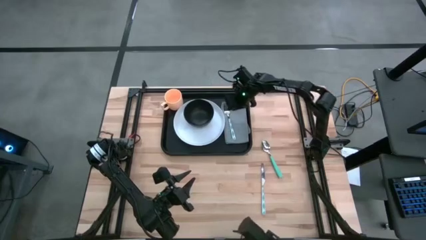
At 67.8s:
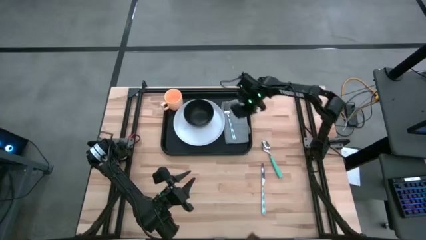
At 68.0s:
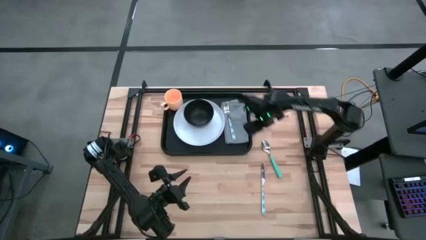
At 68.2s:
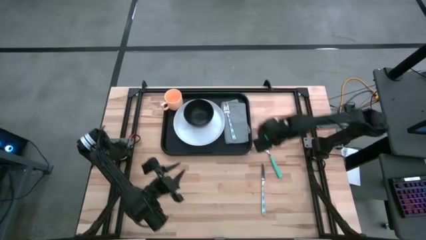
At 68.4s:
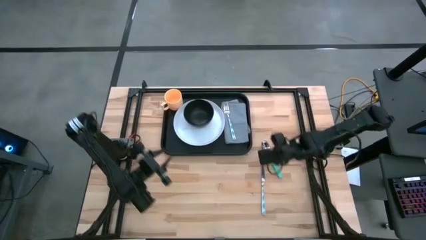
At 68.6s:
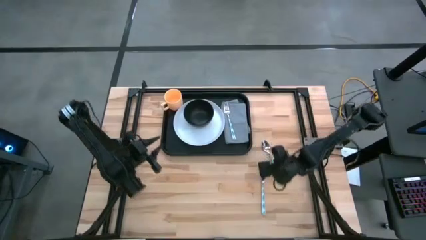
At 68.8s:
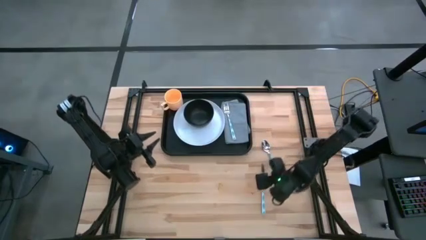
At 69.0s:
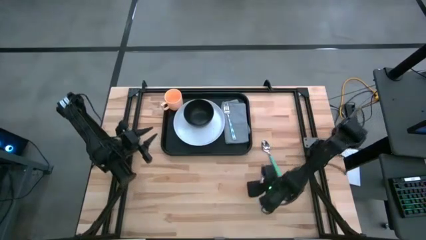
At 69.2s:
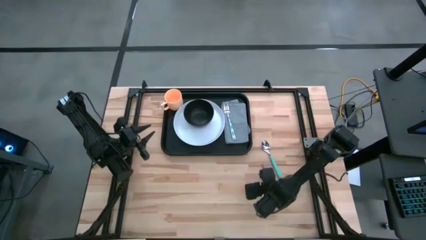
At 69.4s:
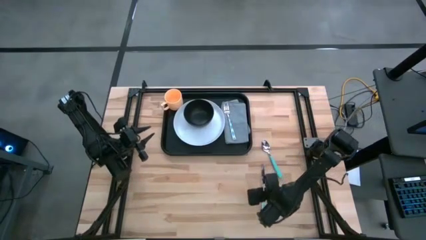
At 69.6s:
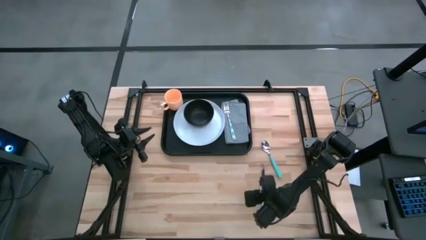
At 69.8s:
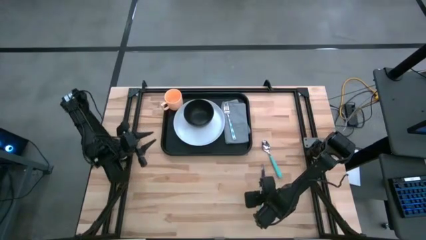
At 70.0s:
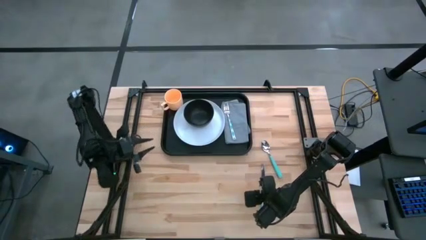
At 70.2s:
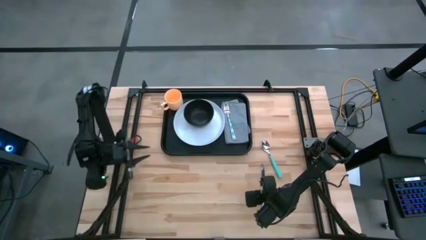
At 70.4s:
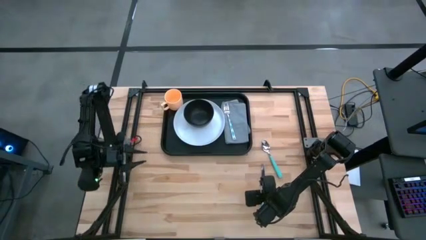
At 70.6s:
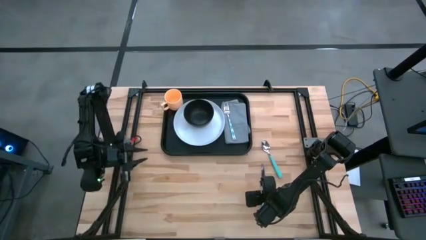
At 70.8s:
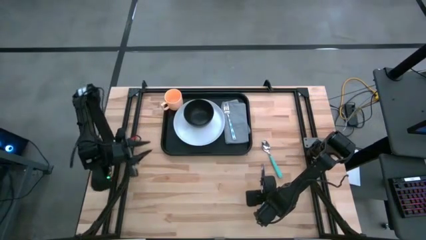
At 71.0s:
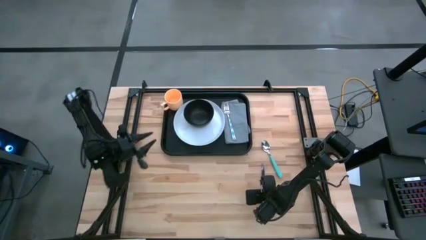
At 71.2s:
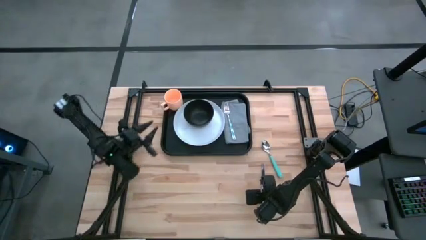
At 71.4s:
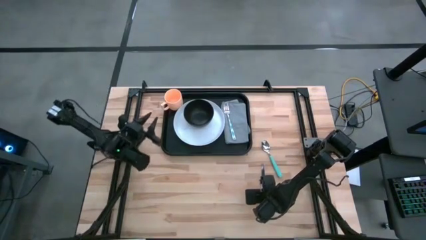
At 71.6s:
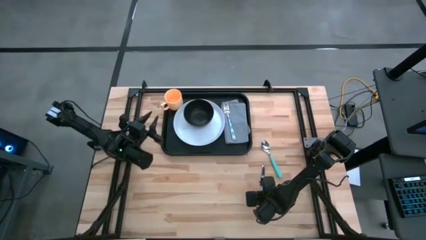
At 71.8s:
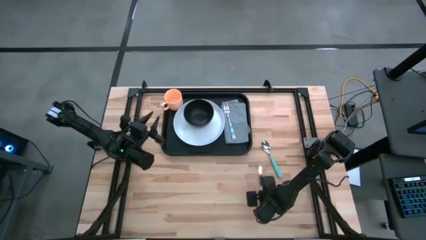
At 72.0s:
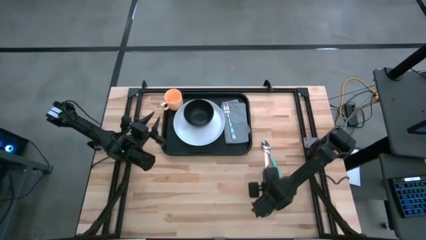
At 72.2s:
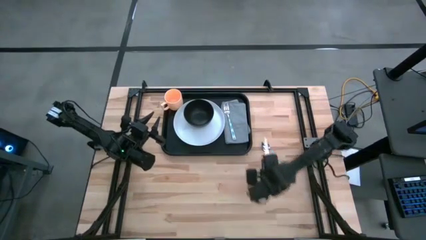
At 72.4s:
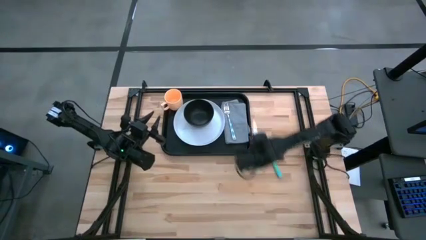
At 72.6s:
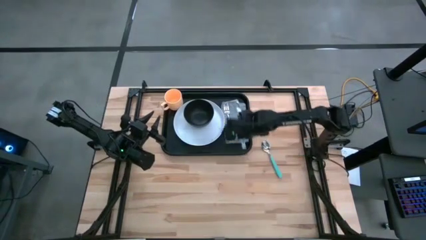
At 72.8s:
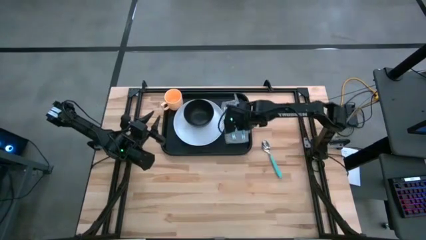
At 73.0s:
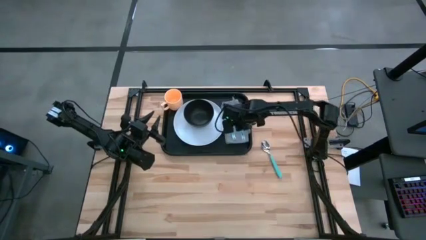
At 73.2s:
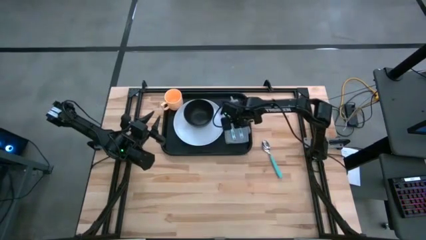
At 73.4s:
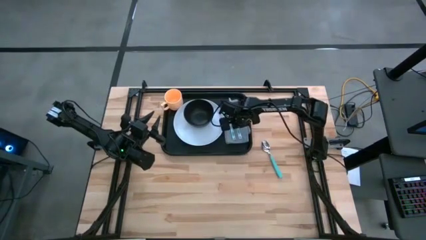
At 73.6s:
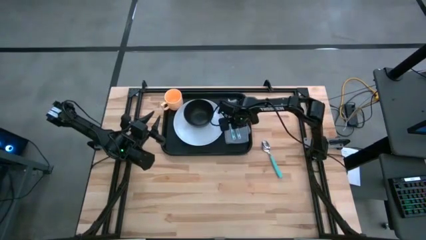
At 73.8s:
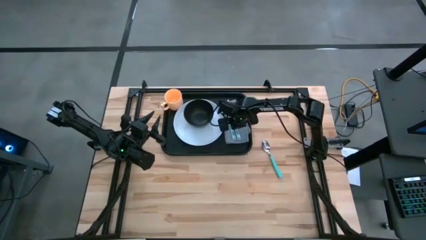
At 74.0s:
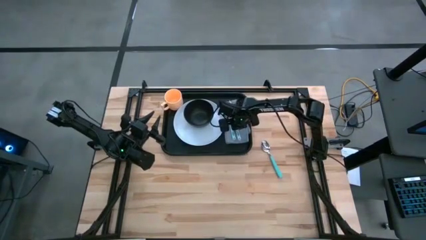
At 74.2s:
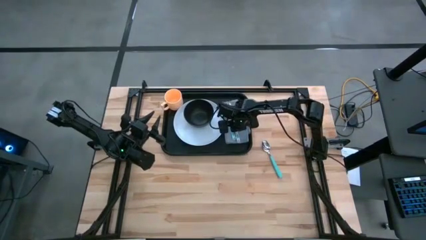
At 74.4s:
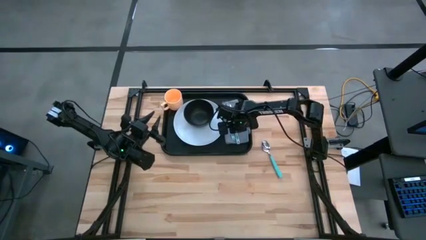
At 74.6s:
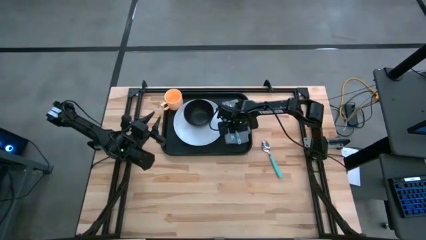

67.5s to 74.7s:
Task: Set up tray
Put the knife to the right of the fork on the napkin

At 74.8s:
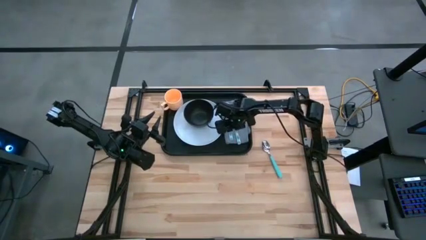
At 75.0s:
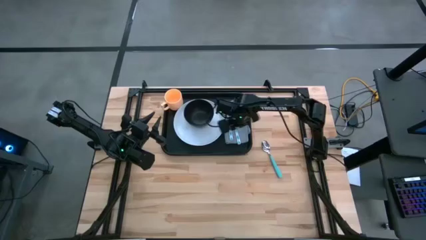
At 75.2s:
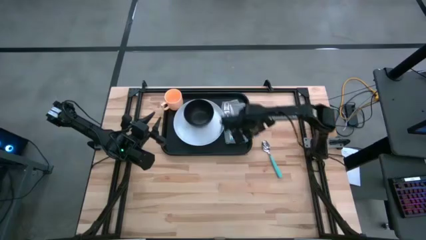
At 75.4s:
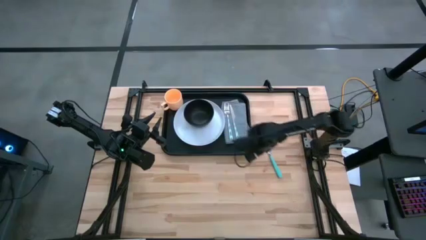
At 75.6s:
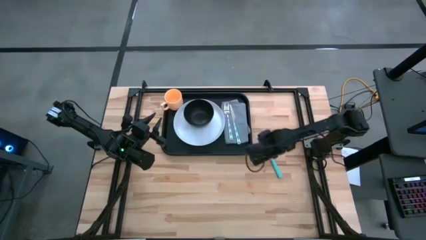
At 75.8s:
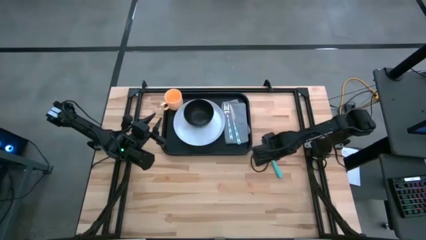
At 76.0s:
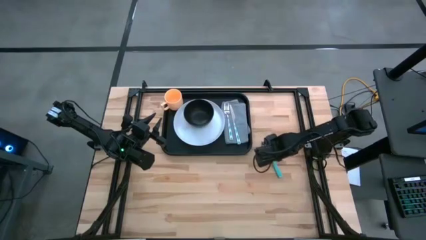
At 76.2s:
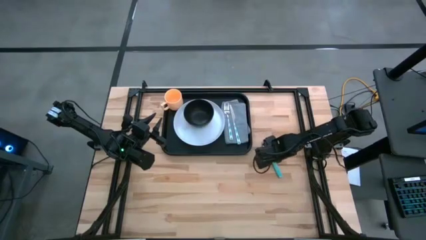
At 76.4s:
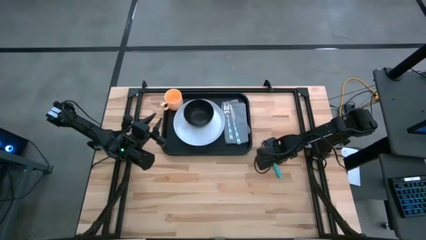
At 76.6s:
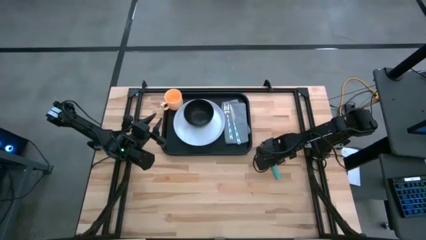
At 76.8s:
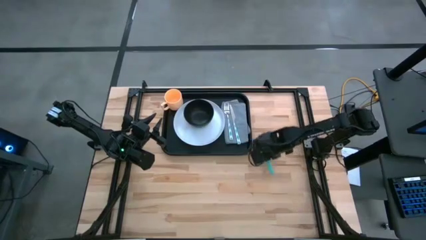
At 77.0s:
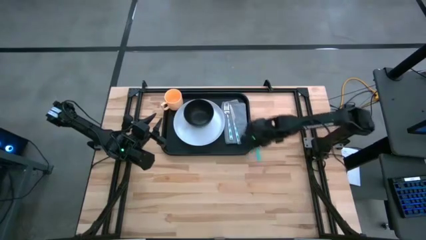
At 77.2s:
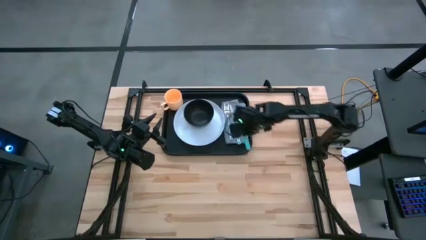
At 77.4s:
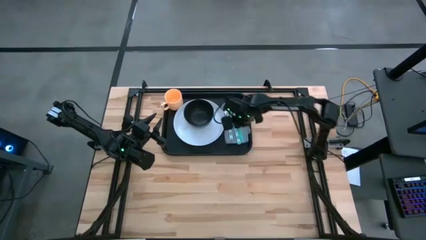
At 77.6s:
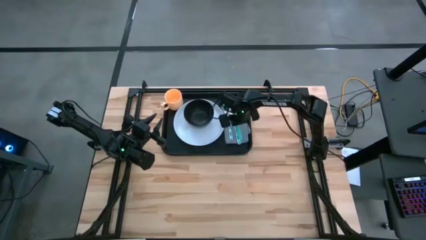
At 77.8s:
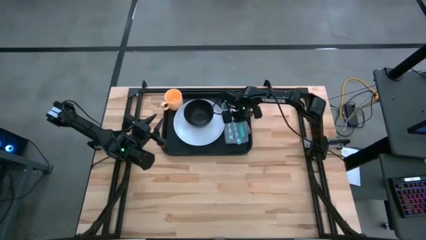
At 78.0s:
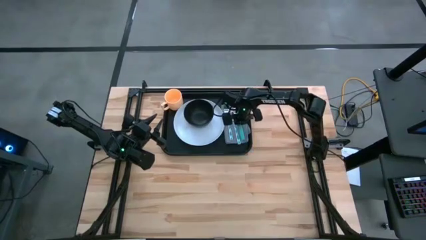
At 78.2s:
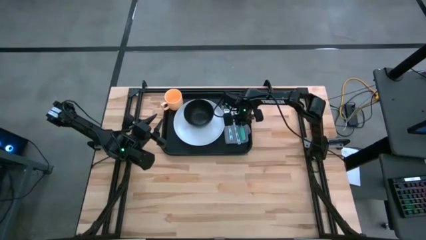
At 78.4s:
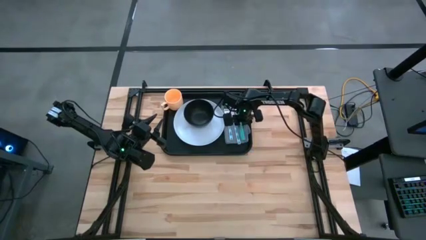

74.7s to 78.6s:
Put the spoon to the right of the knife on the napkin

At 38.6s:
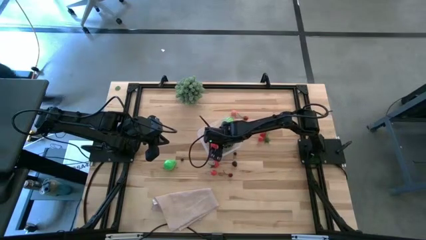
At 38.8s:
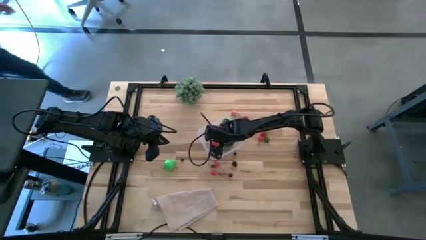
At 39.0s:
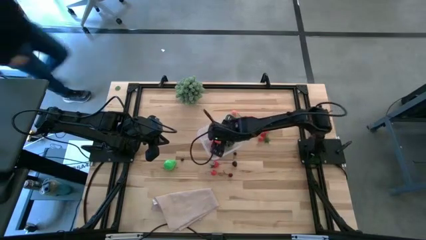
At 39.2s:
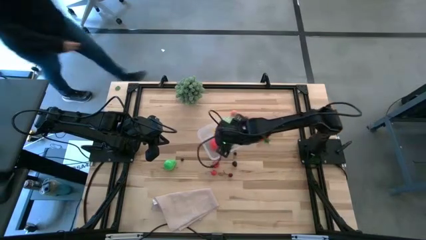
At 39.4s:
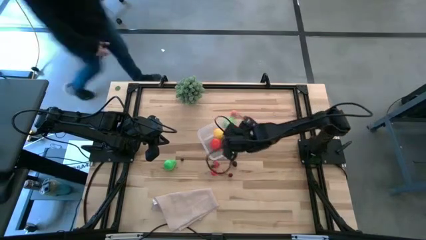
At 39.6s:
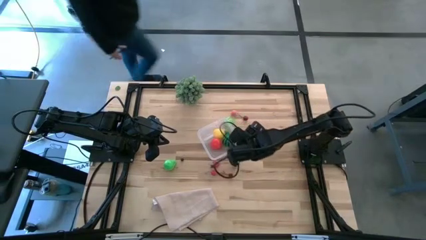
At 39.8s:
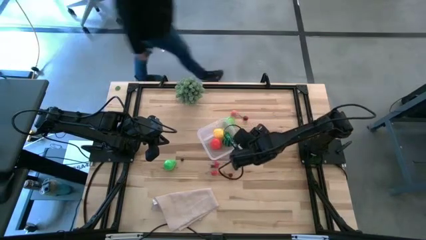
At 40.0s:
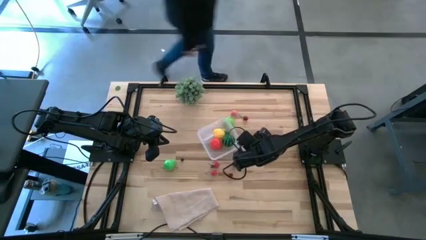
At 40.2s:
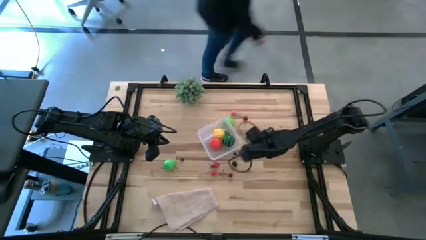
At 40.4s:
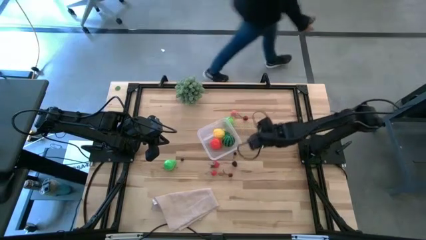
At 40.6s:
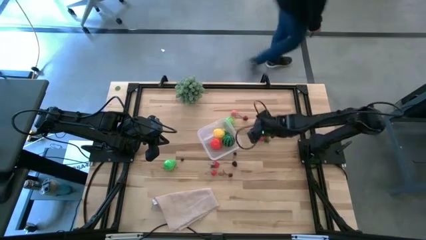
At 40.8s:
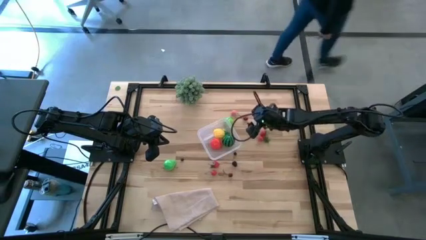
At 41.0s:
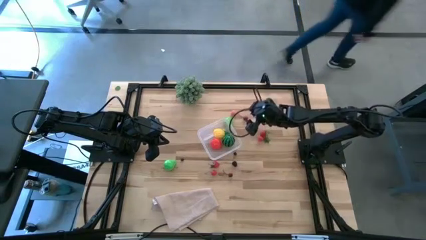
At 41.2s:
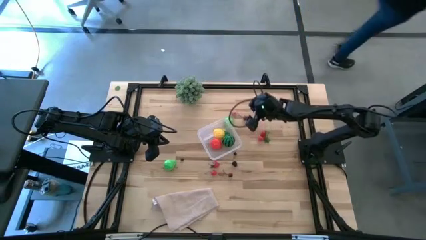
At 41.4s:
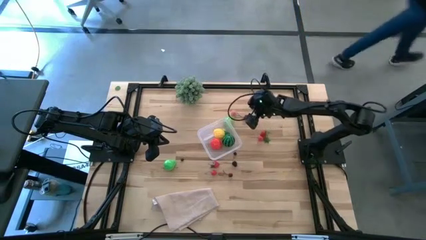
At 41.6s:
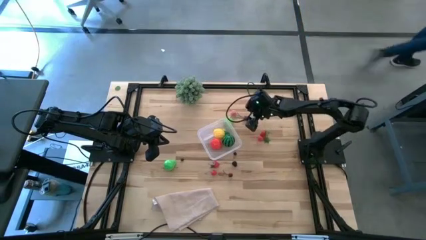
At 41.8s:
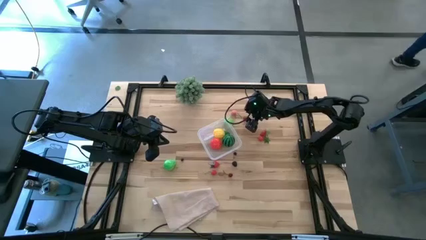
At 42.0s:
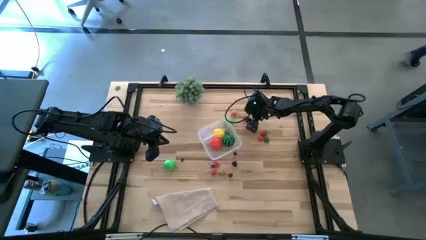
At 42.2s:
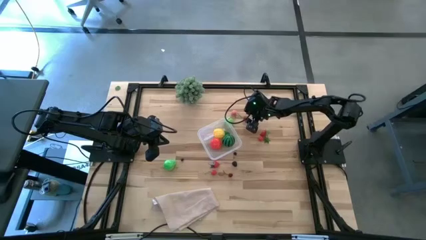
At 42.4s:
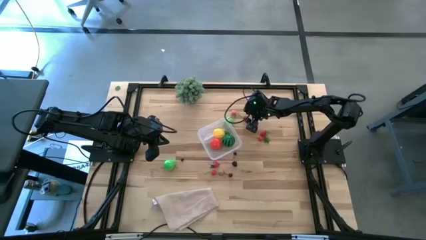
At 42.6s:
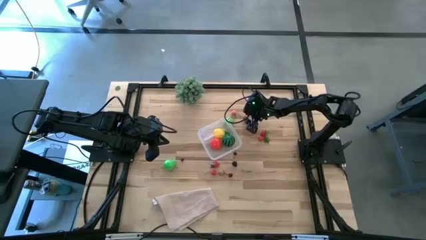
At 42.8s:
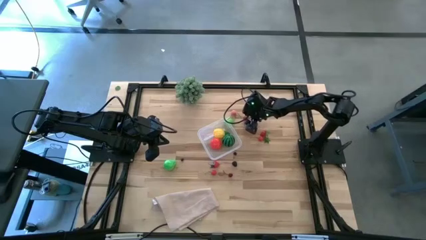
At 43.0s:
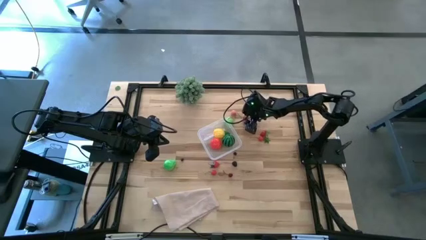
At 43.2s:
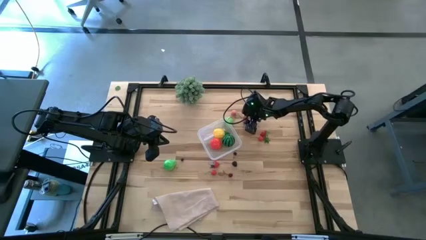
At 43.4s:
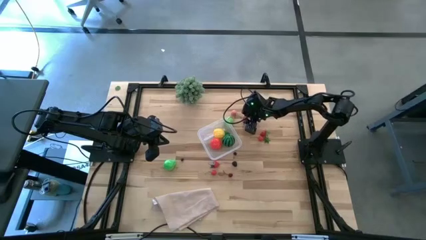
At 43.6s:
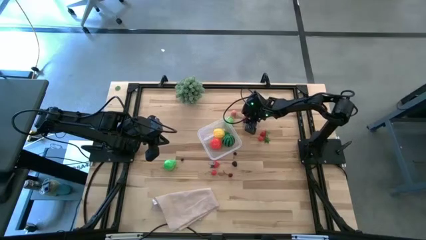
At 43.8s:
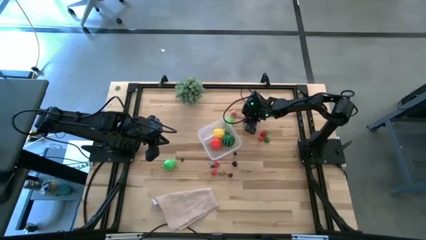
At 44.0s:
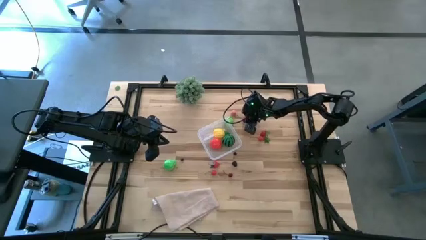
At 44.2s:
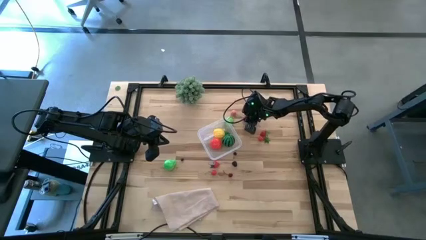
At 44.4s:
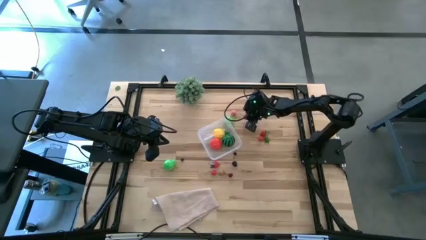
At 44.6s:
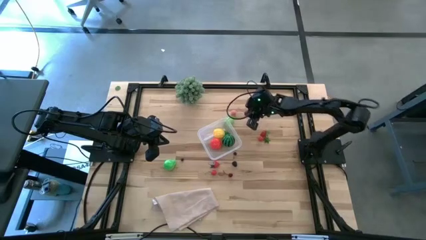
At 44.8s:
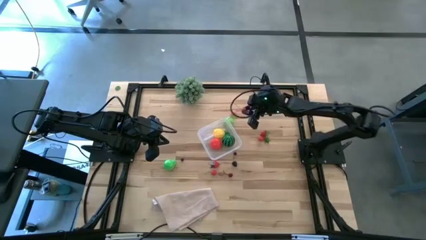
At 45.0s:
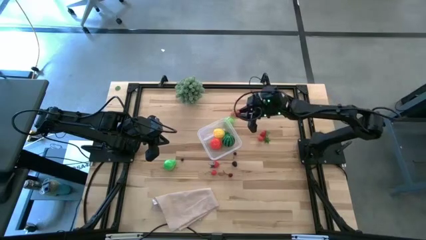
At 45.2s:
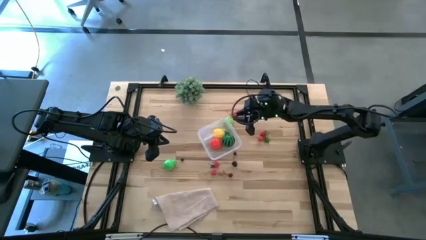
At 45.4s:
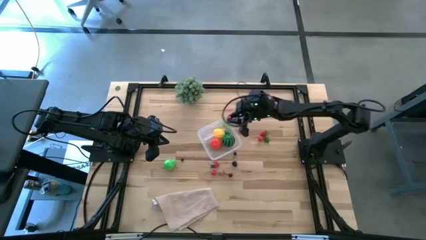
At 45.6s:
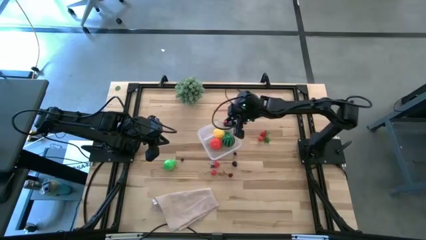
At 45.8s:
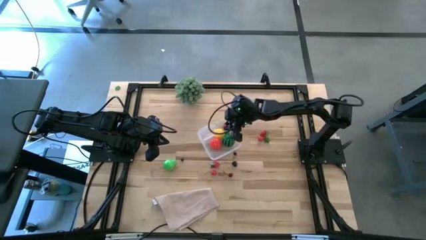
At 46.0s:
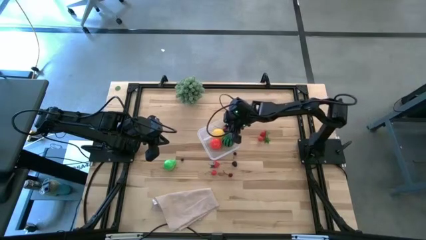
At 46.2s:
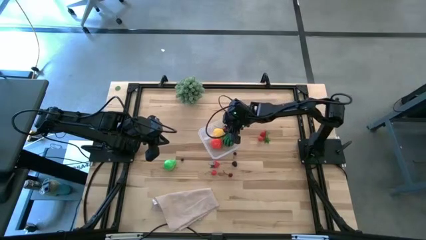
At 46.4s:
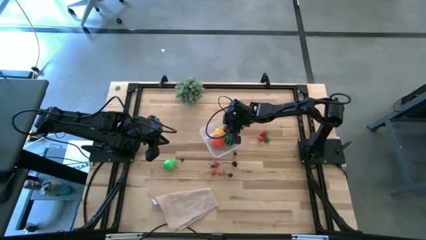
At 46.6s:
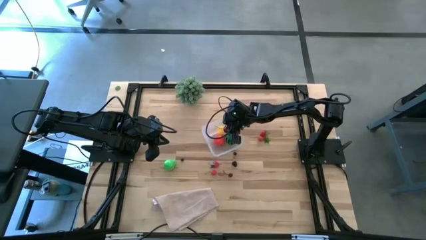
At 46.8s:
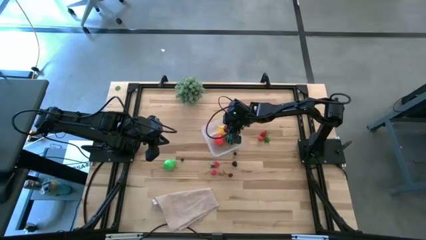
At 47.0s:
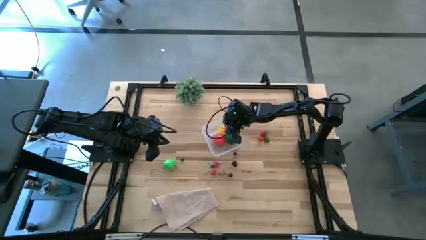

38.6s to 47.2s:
Task: Pick and placing Produce into tupperware
Put the red cherry into the transparent bin
